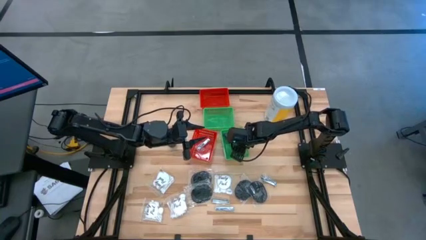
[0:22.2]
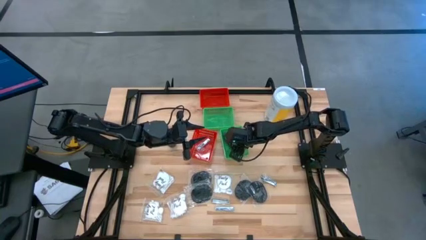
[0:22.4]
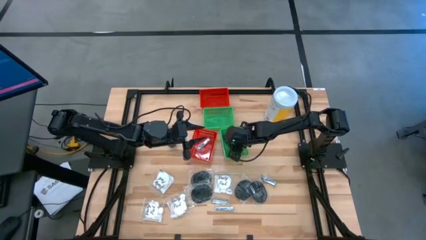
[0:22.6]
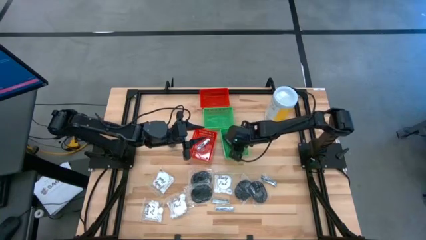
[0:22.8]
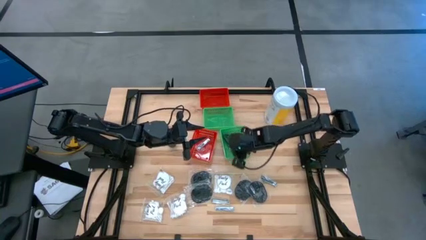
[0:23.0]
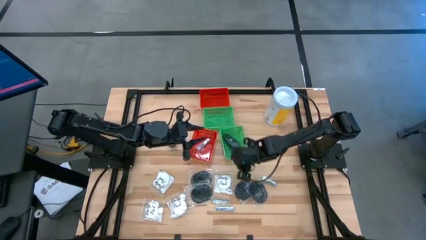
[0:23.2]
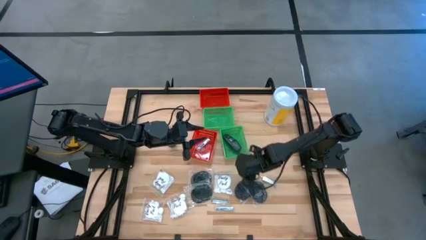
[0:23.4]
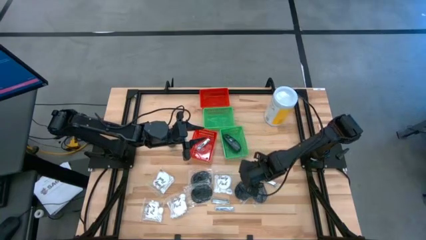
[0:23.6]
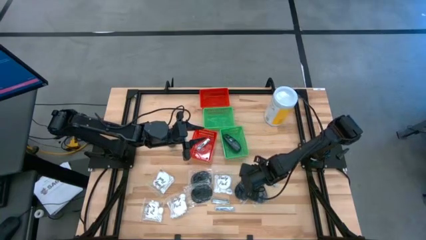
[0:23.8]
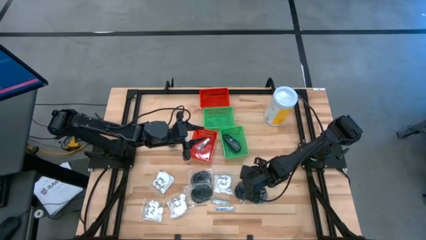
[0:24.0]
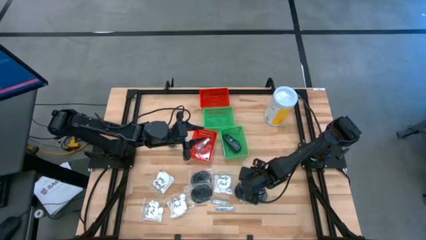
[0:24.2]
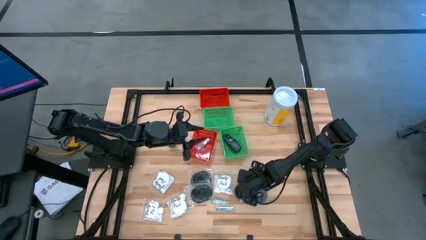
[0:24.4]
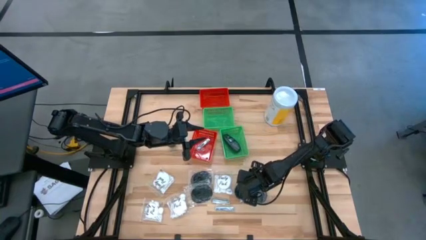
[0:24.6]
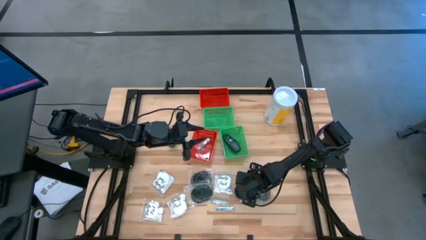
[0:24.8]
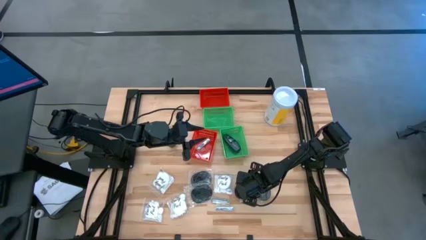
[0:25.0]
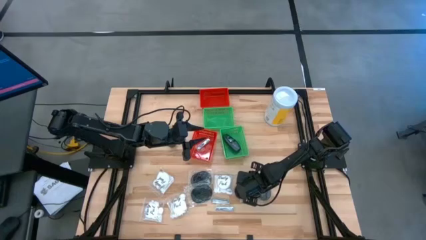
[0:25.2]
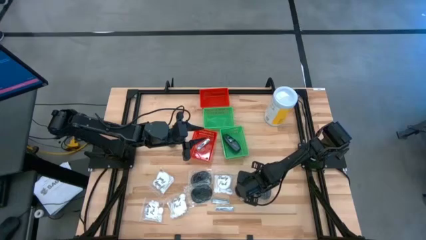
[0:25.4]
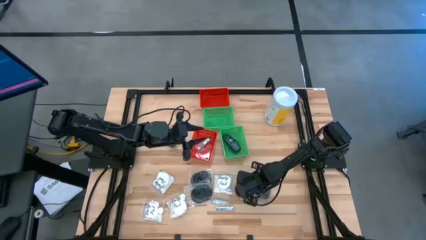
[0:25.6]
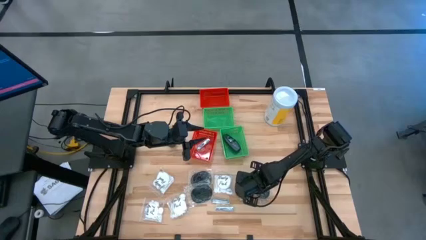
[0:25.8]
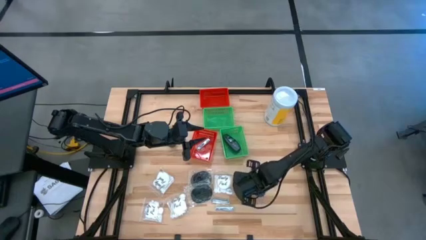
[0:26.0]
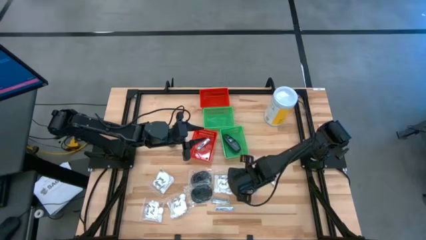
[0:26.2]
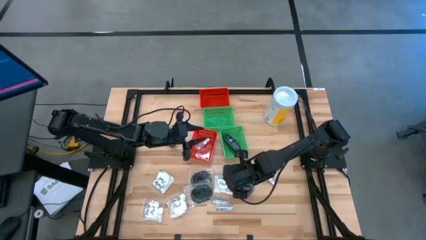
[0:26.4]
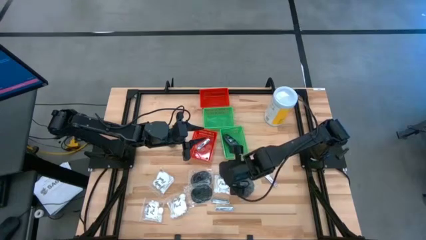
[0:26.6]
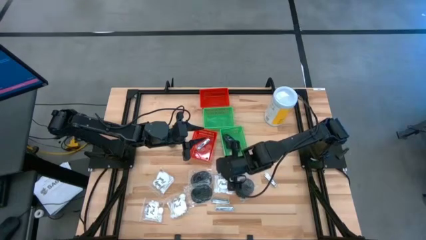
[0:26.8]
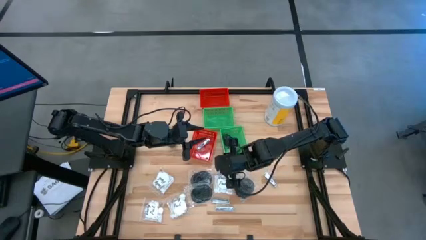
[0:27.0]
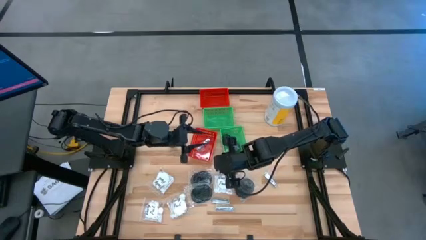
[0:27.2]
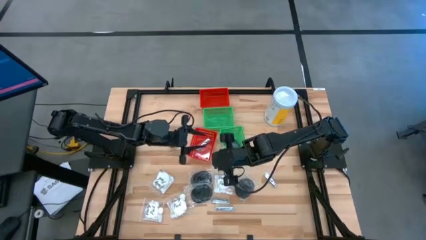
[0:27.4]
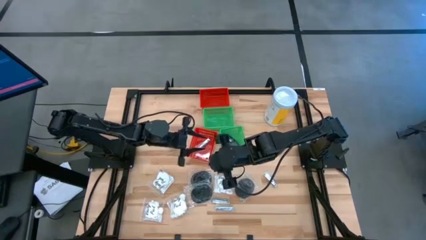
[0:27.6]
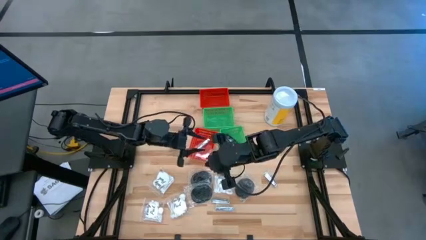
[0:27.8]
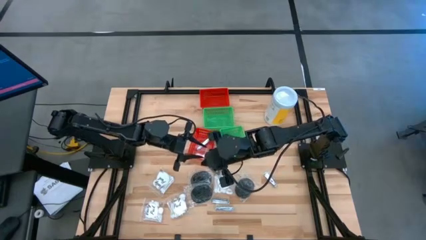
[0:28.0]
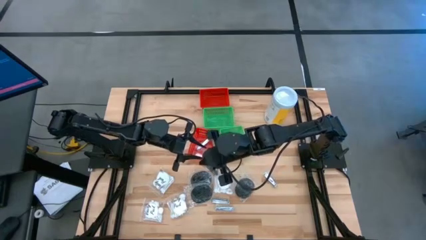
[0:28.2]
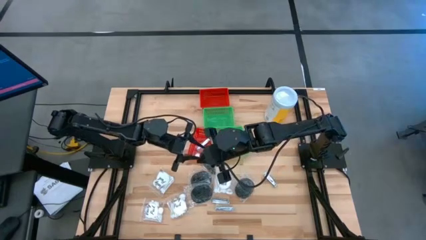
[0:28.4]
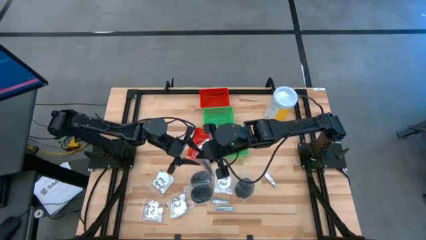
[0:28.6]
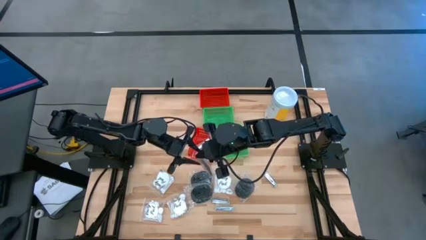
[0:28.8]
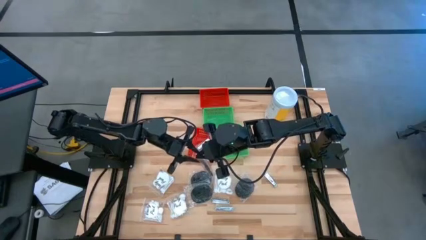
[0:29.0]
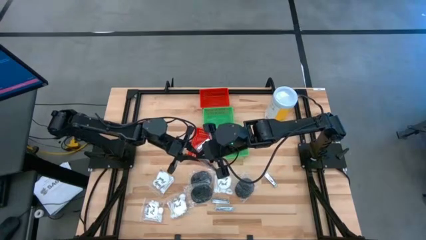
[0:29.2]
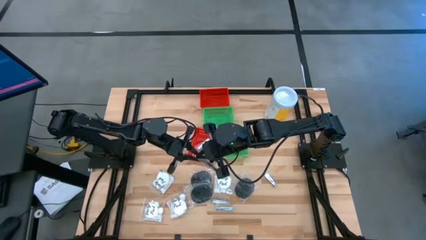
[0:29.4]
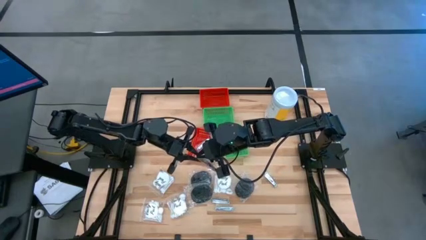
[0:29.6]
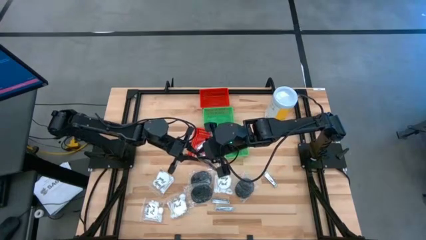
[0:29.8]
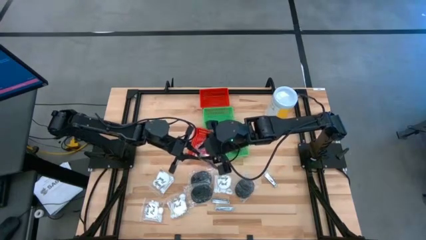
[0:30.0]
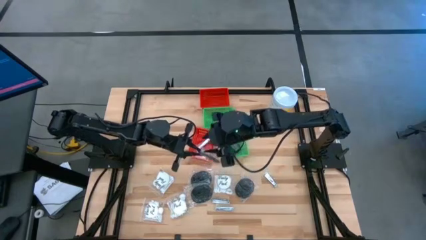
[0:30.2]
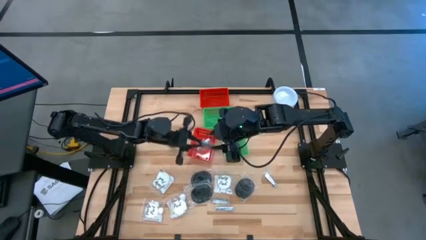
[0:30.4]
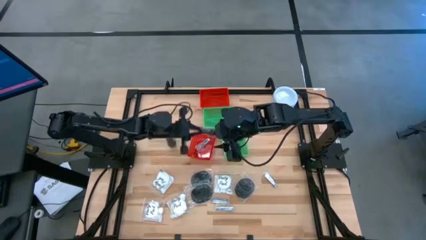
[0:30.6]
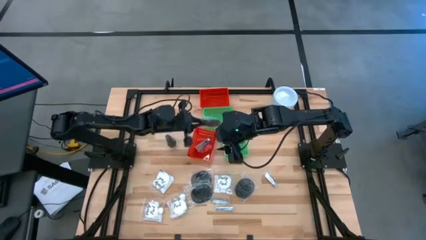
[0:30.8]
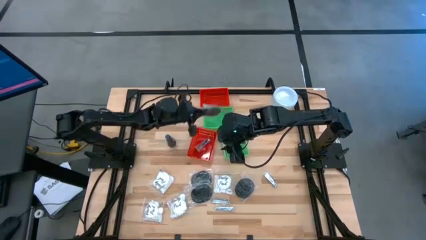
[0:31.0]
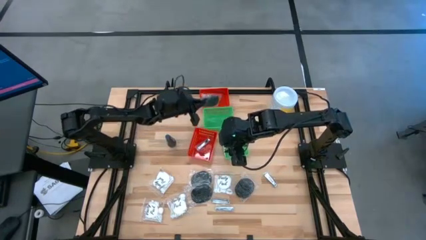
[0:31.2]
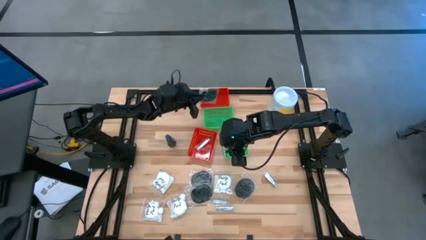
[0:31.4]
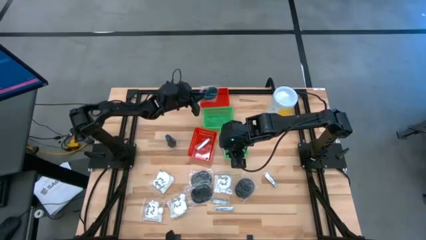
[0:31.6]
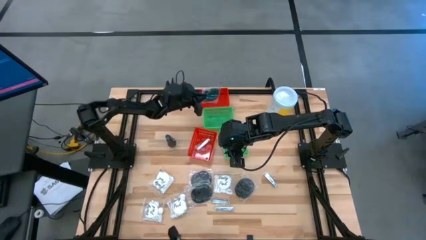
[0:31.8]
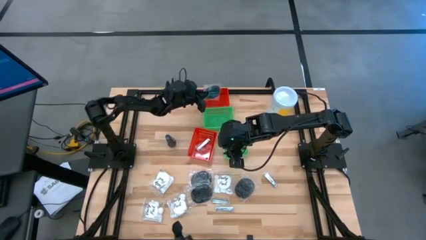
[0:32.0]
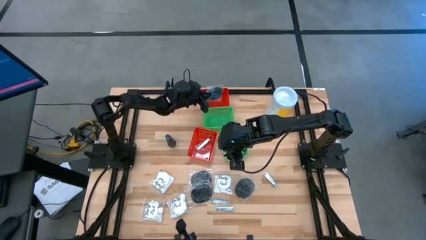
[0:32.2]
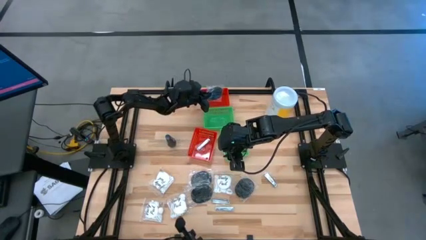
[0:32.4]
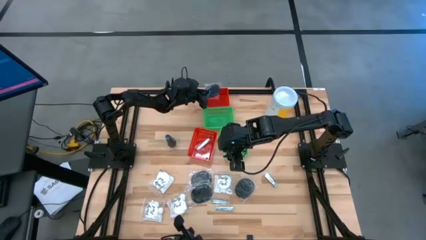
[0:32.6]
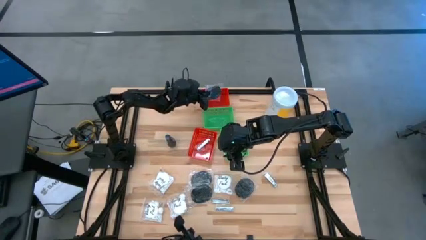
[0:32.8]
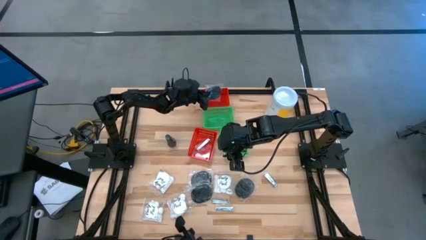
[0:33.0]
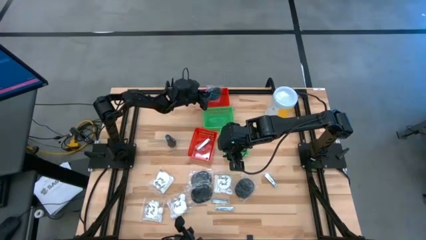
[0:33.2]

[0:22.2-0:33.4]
Task: Pick & Place Travel size toiletries
Put the black hairbrush into the top red bin
